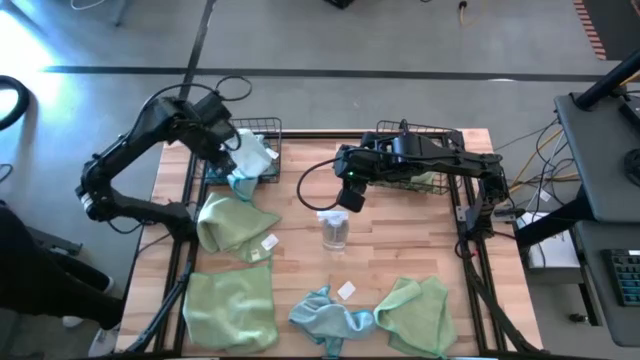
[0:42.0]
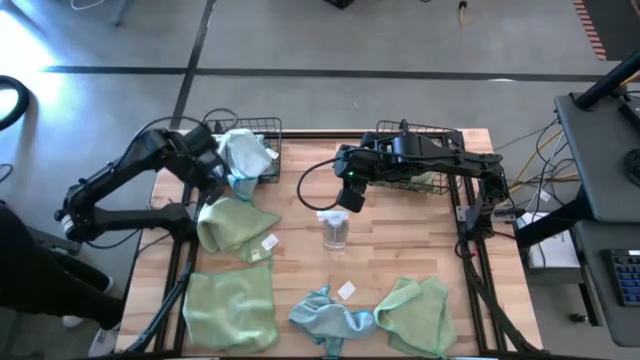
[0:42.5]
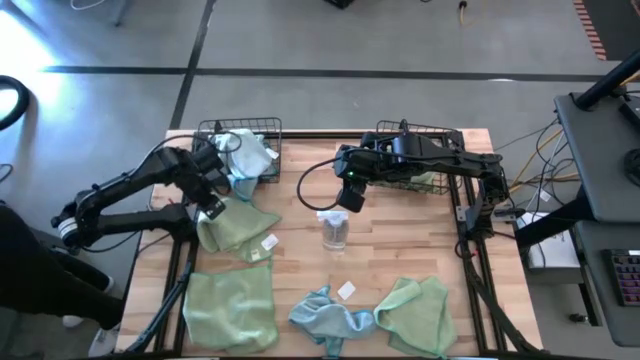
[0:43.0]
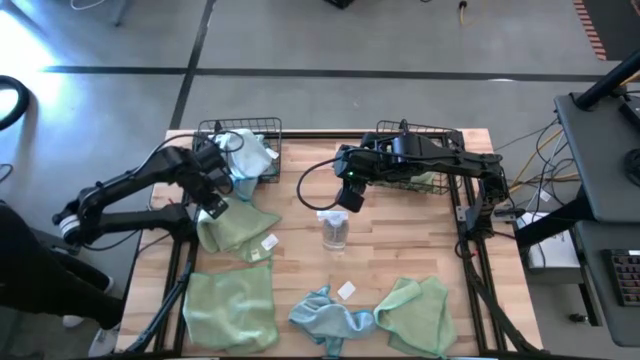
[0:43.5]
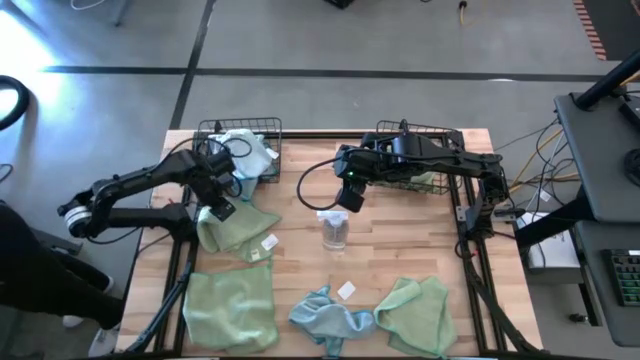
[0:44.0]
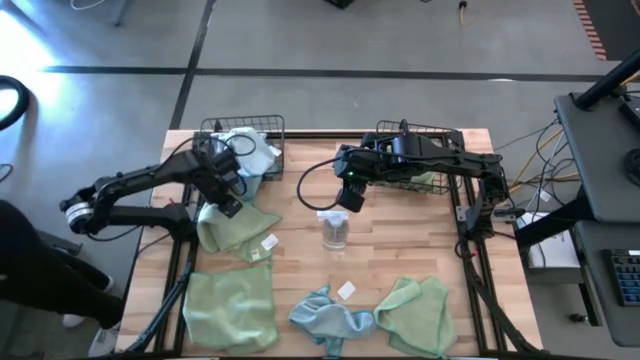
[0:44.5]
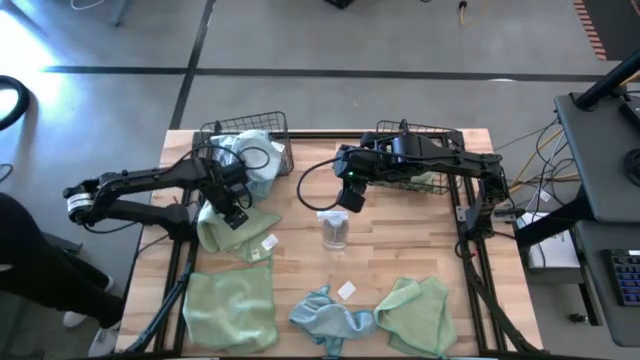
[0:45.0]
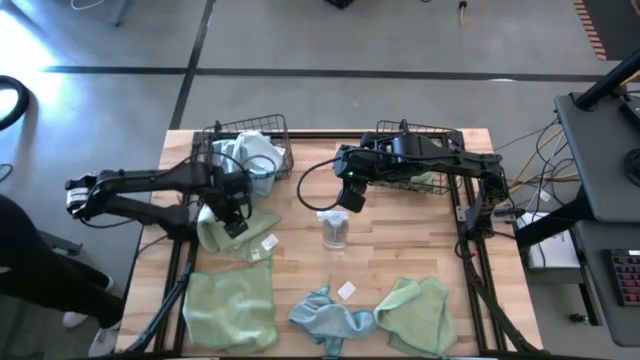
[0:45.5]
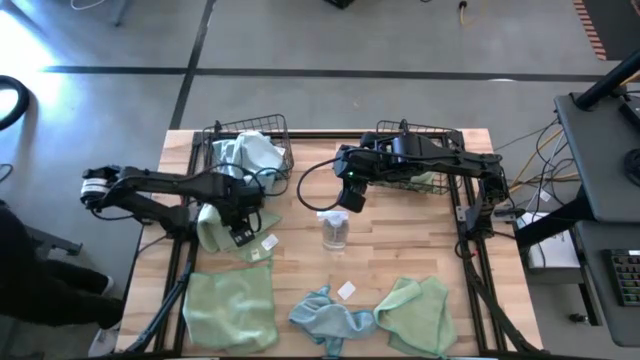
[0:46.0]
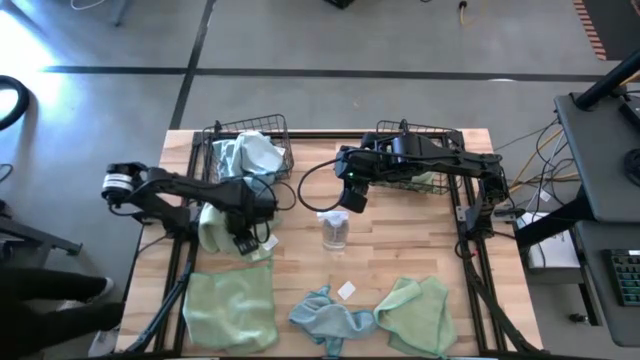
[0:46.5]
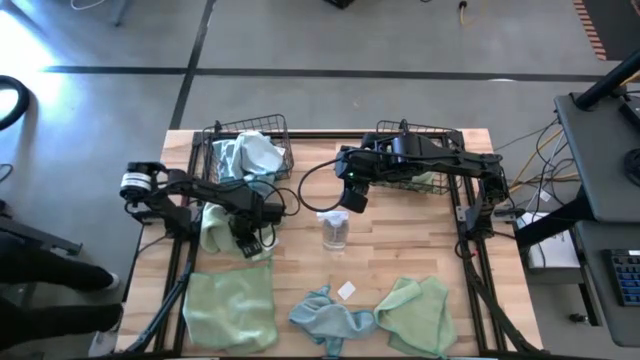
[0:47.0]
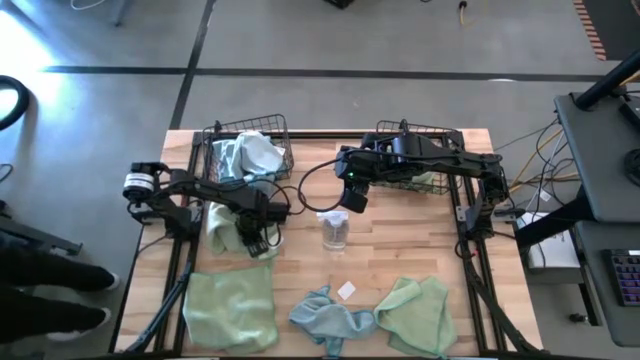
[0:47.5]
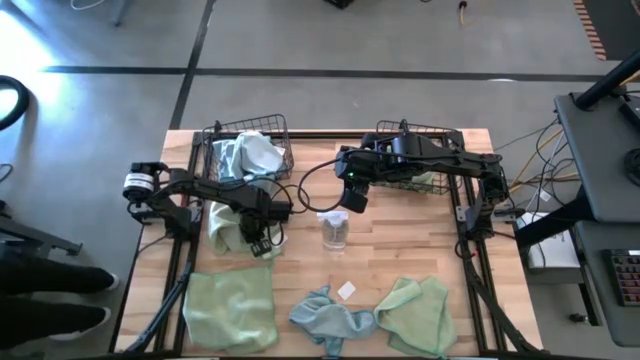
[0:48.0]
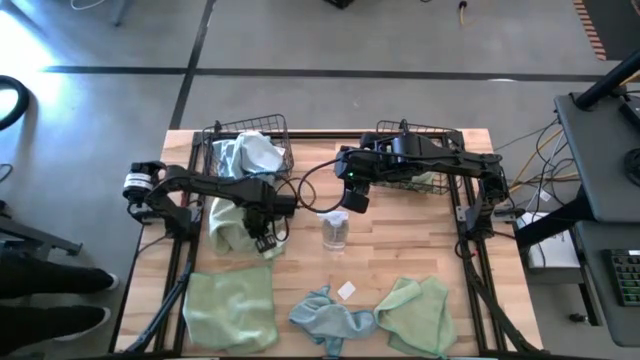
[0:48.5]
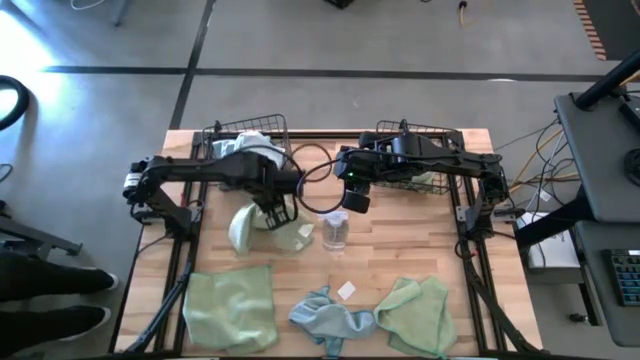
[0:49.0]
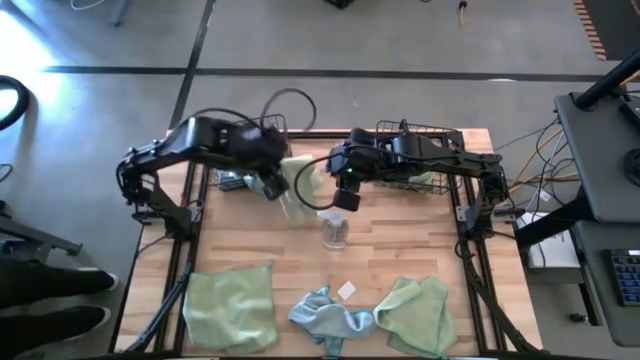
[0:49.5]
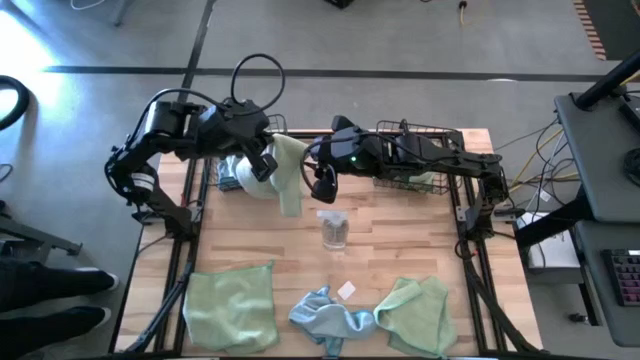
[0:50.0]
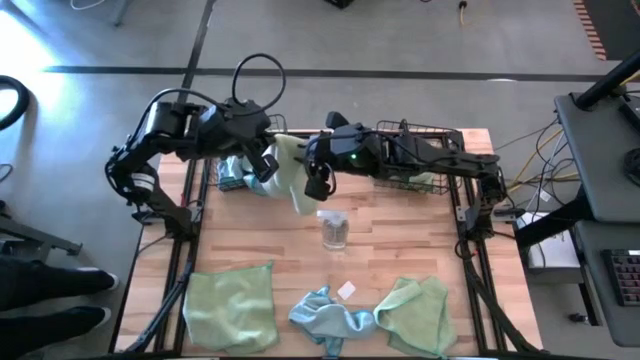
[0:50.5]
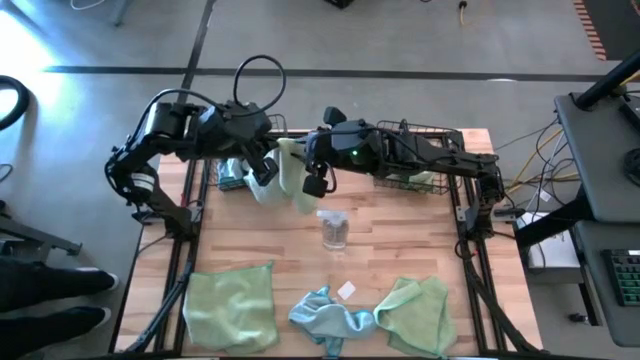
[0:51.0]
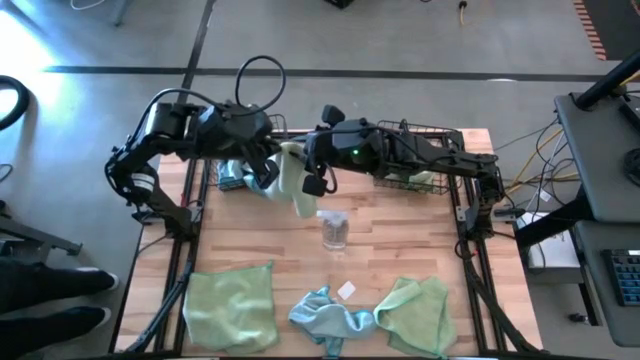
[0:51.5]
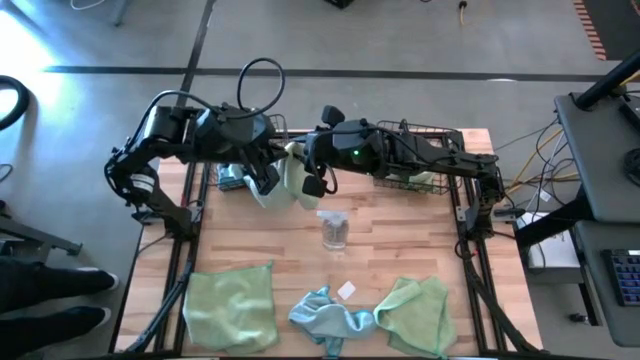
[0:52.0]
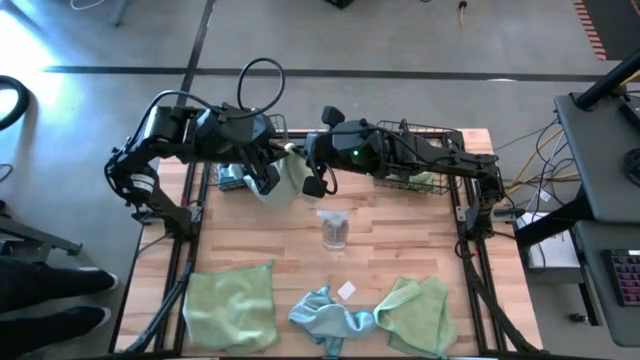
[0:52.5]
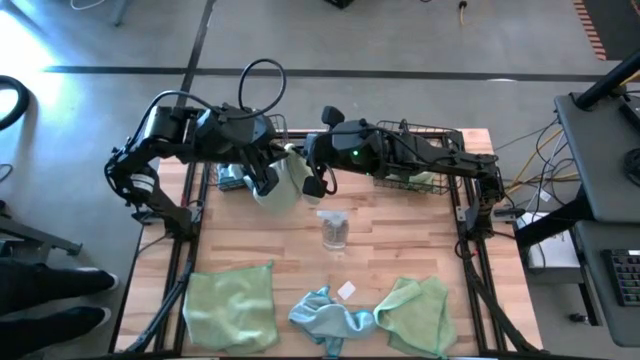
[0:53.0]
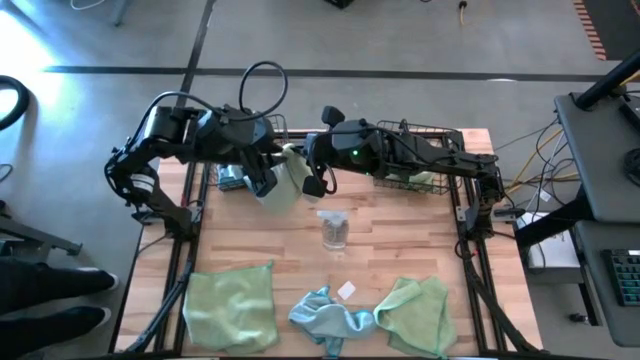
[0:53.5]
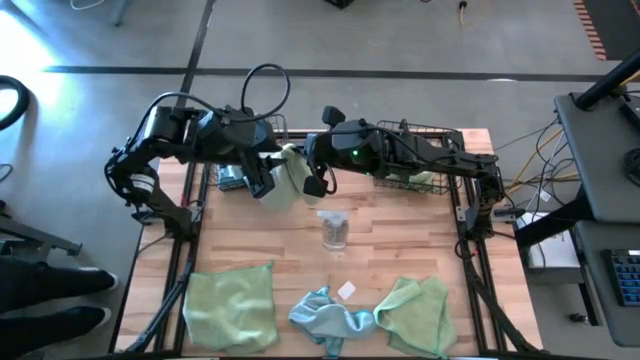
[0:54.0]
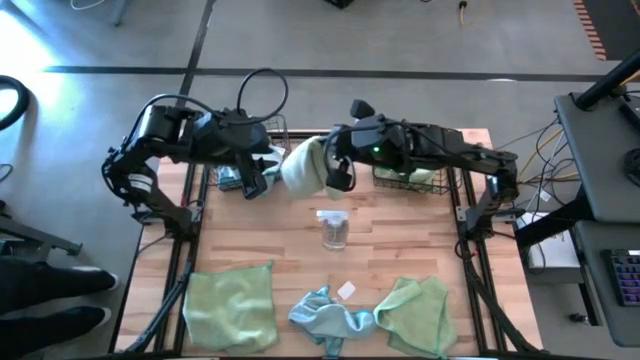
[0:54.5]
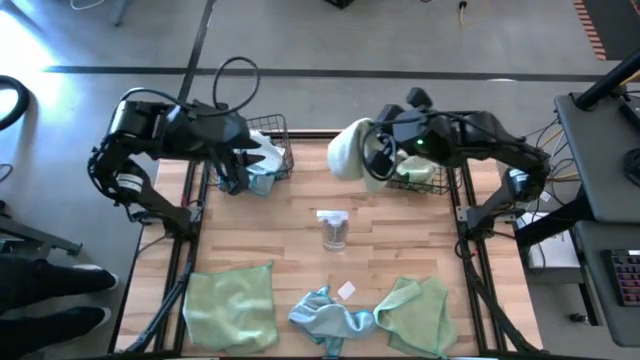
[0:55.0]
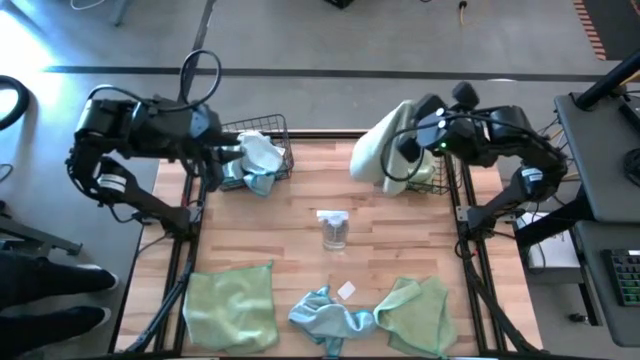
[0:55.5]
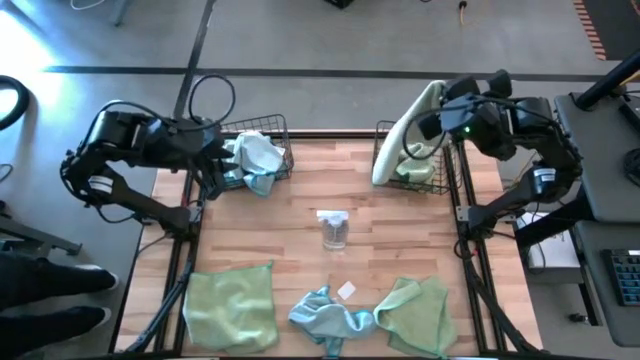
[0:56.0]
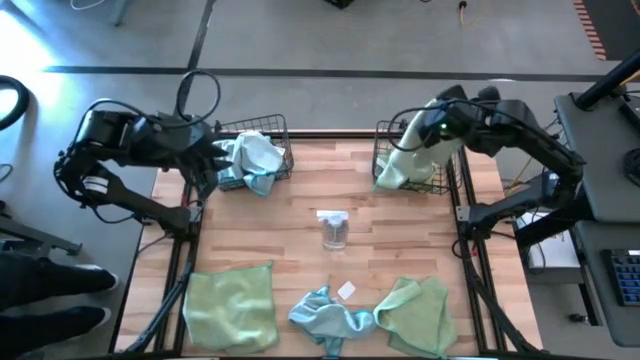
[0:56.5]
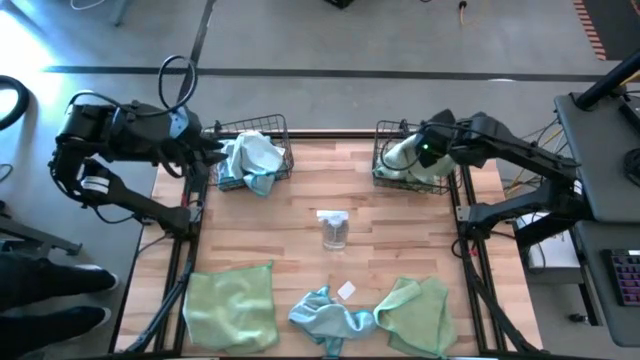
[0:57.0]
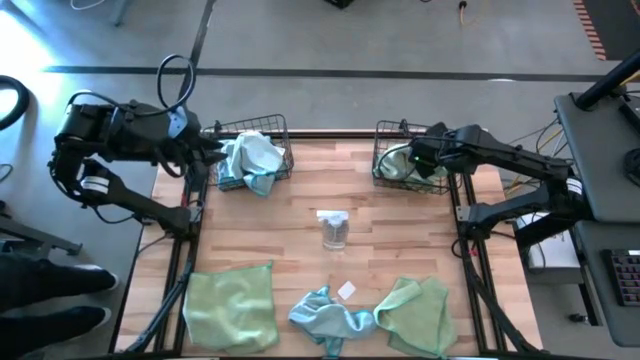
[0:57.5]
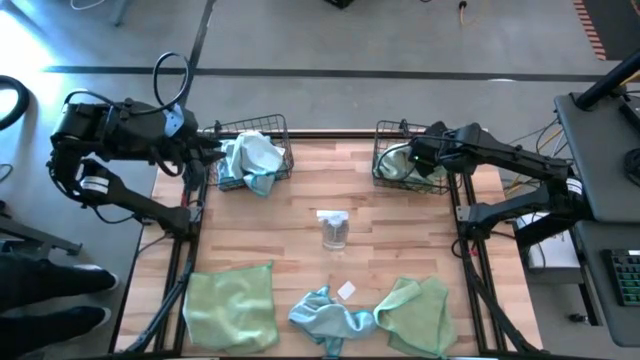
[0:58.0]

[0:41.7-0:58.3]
Task: Sort microfiber towel by color & place in baskets
Put the green towel into the right wire basket

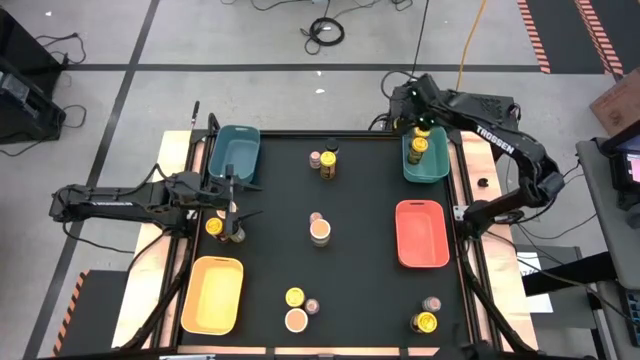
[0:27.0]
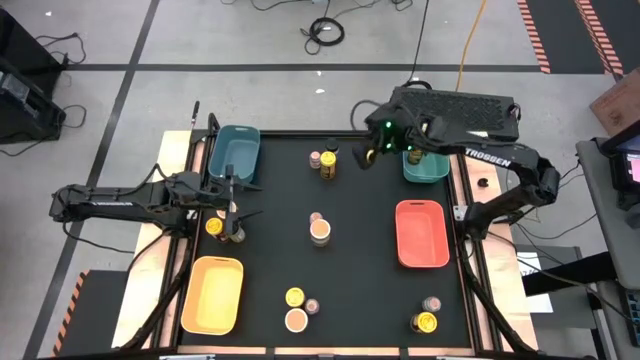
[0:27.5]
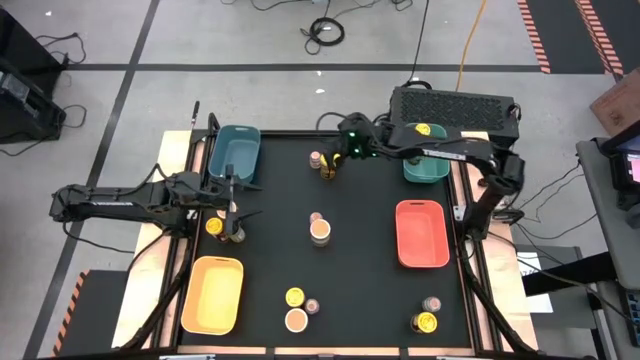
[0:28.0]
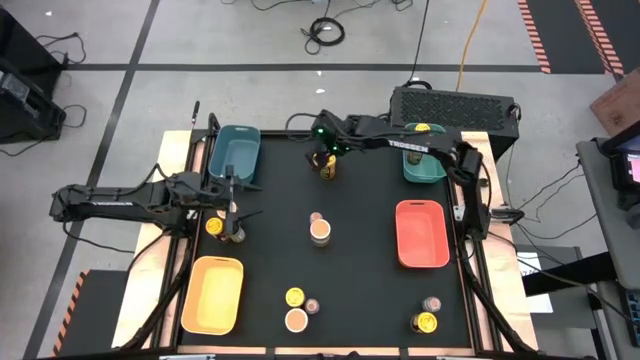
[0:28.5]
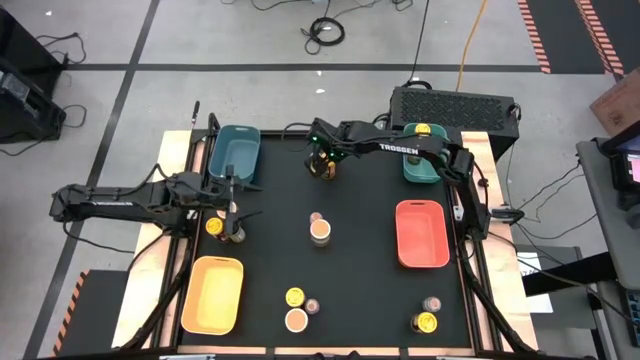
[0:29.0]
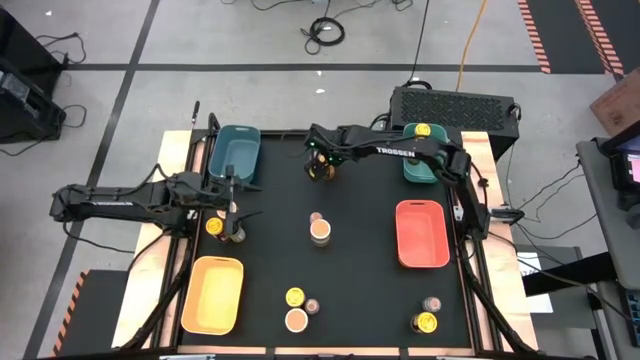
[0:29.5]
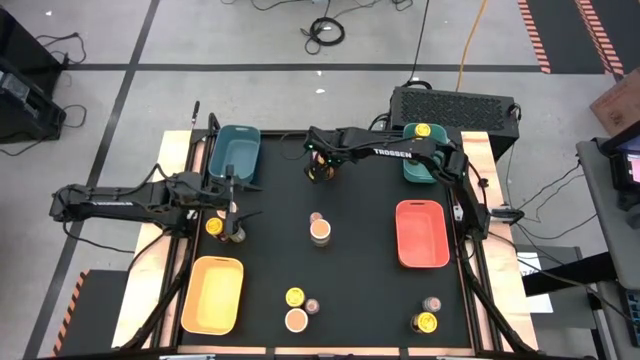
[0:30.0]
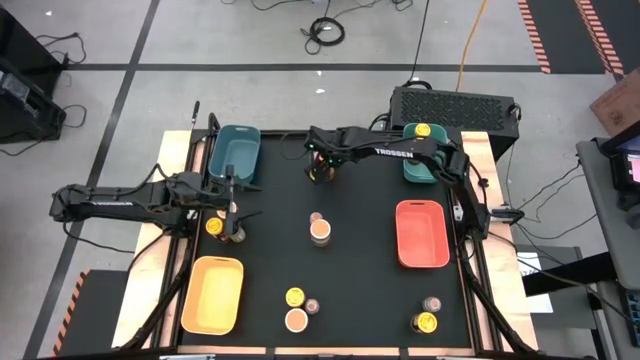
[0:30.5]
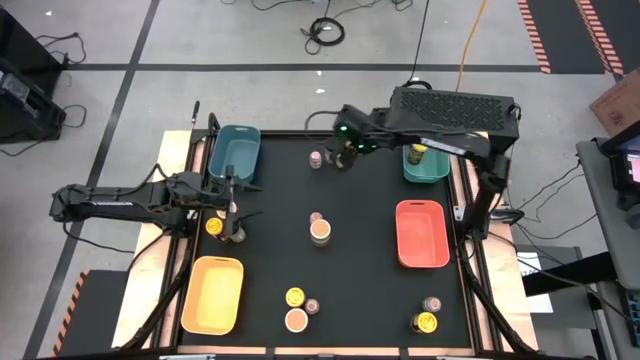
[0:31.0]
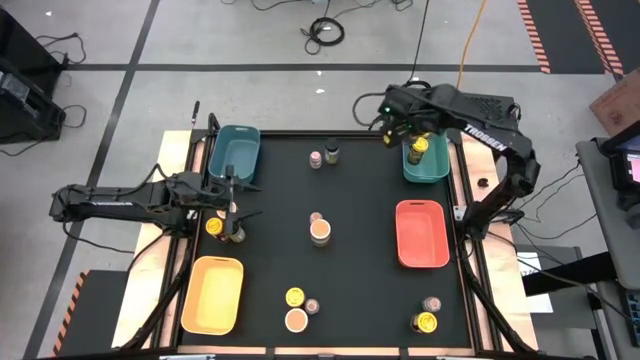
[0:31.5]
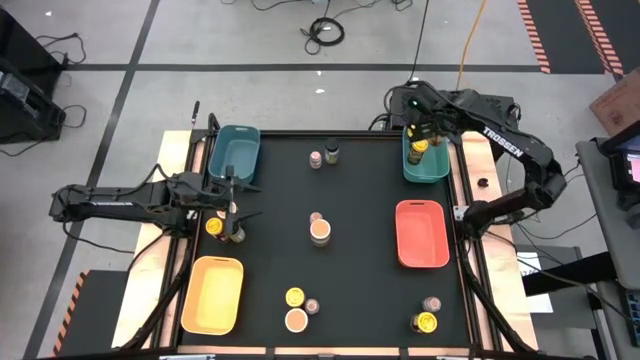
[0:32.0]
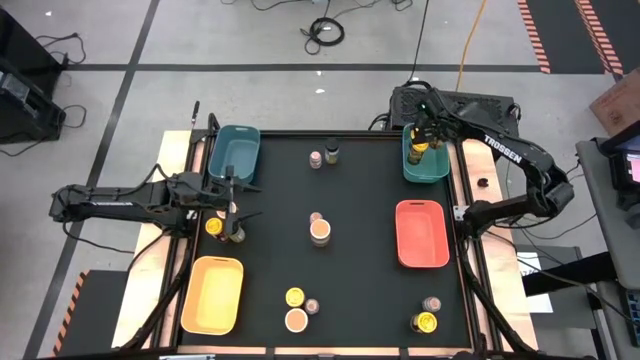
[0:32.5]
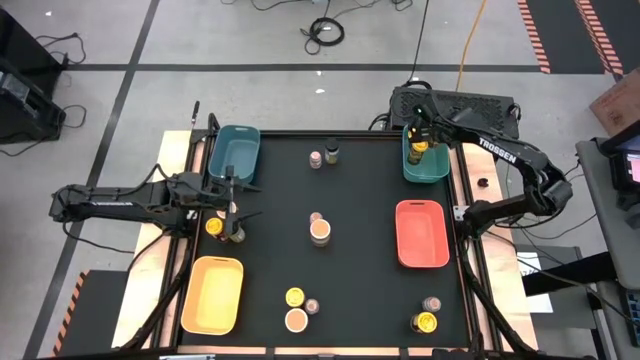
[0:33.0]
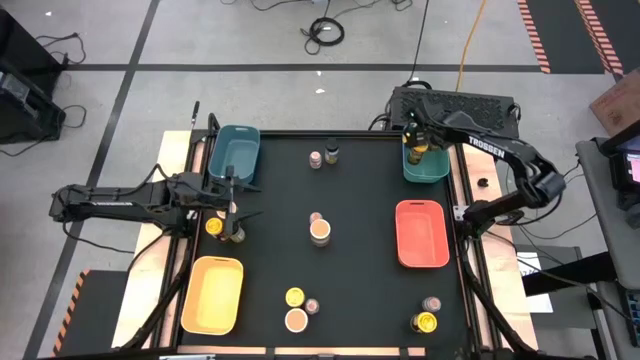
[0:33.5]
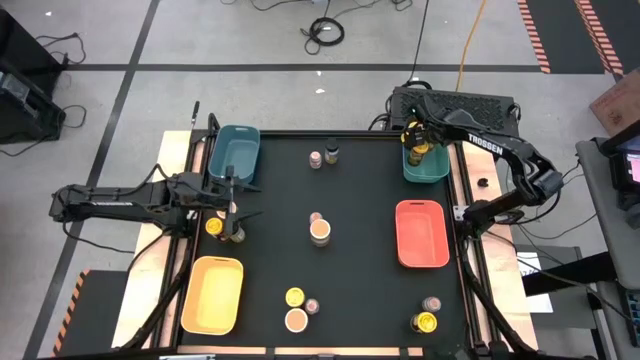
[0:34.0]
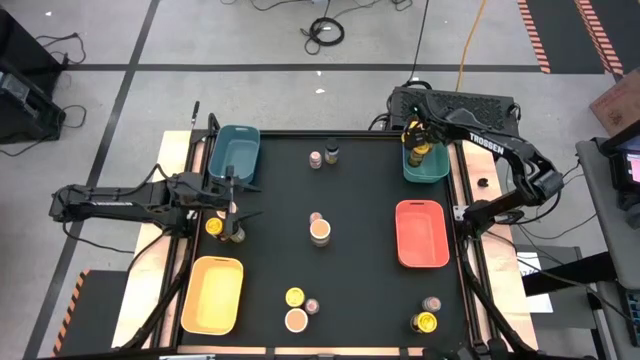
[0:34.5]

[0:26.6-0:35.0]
Task: Sort spices by type
Put the yellow spice container into the light blue bin
